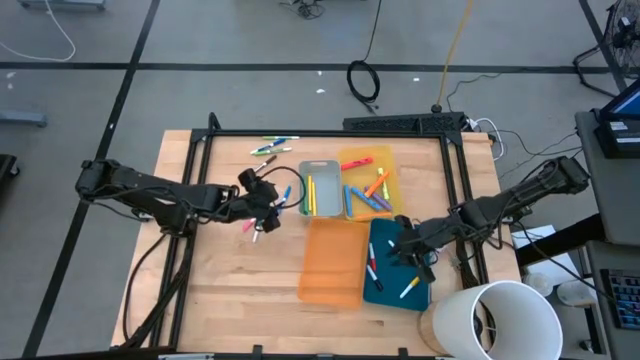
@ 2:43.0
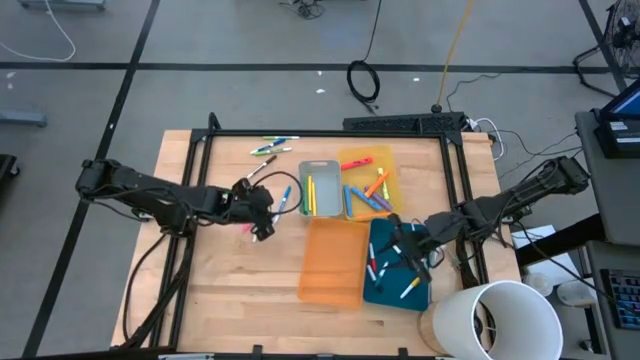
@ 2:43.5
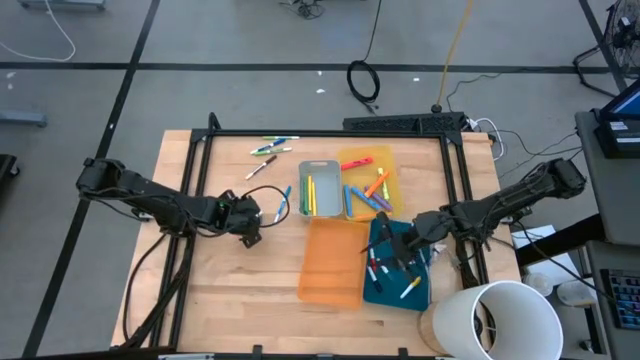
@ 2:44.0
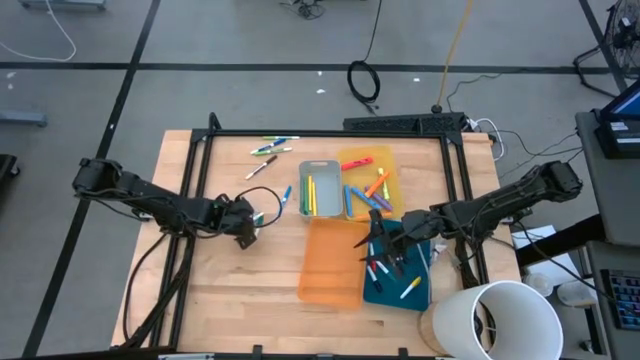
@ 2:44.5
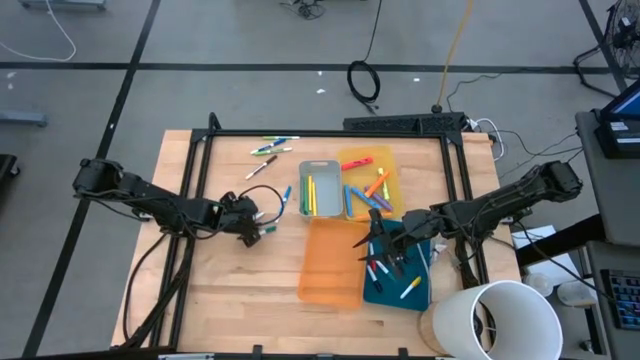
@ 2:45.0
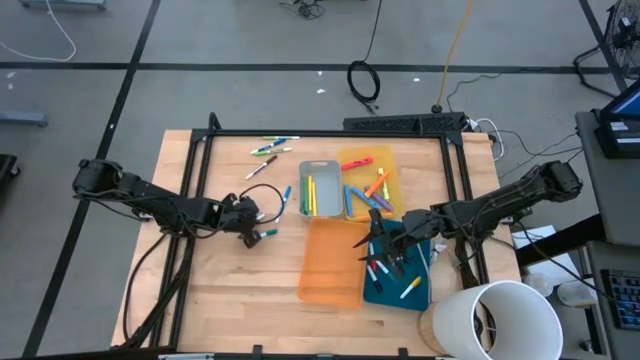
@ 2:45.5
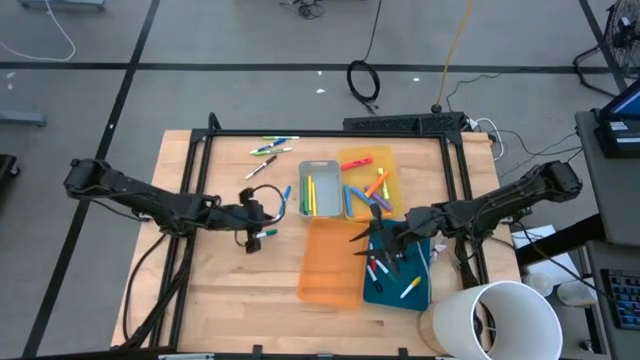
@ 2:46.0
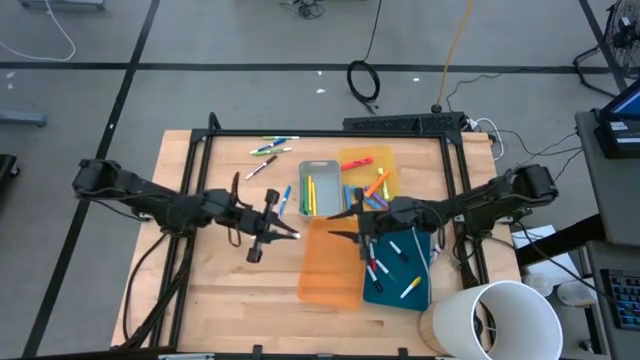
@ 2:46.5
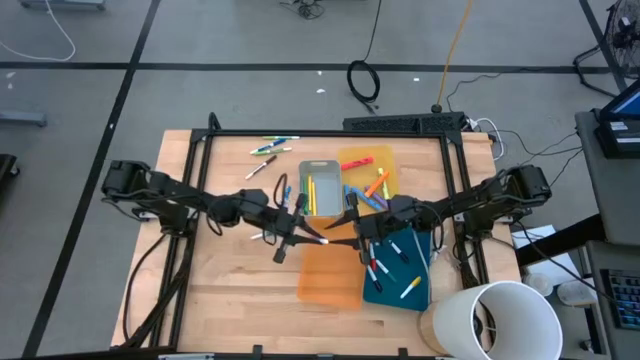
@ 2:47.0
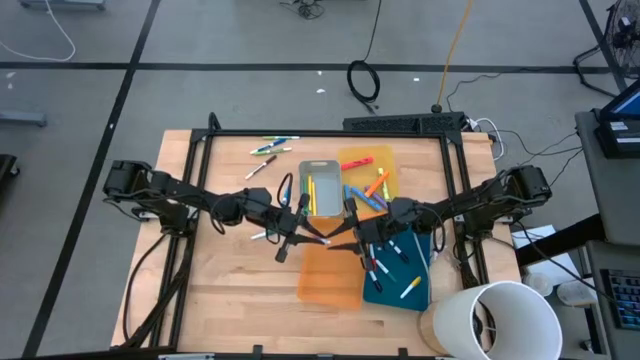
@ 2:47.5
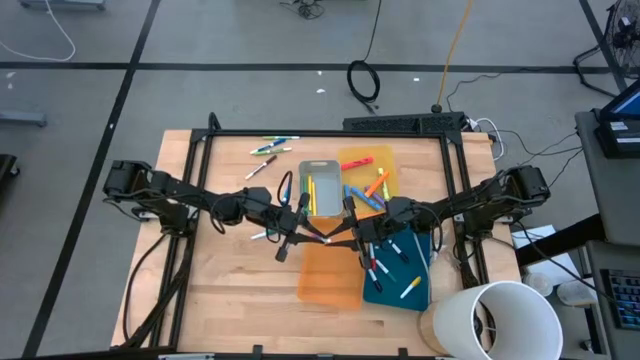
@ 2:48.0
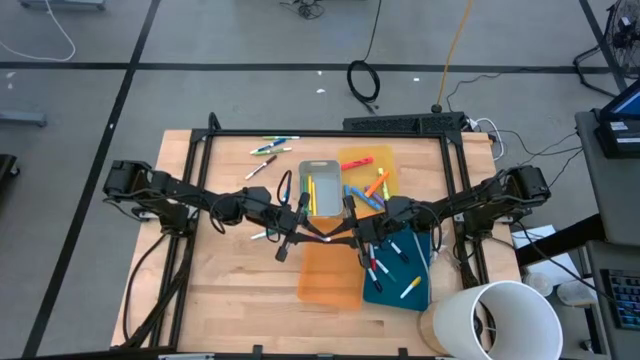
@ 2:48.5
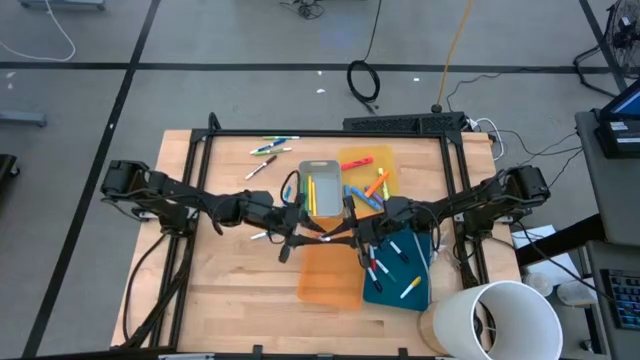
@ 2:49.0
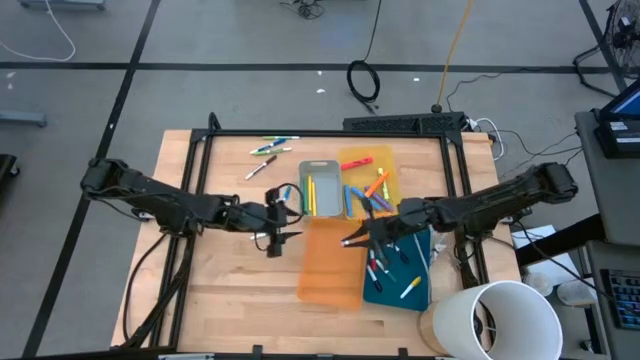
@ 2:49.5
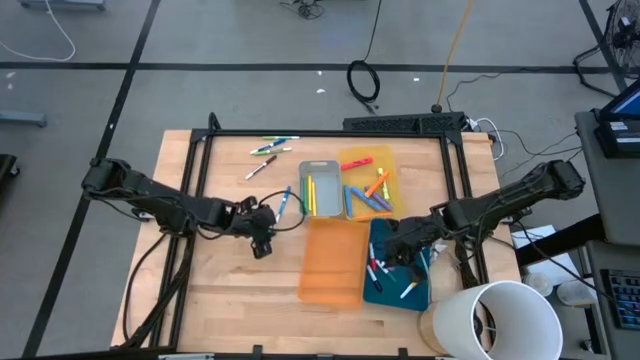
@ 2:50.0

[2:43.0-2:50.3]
Task: Pick & Place Markers
Put the white and pink highlighter pen into the blue bin

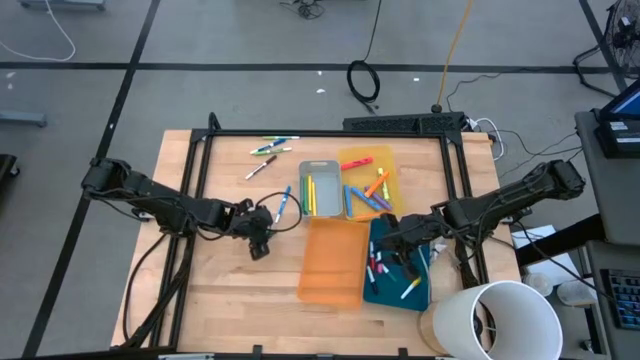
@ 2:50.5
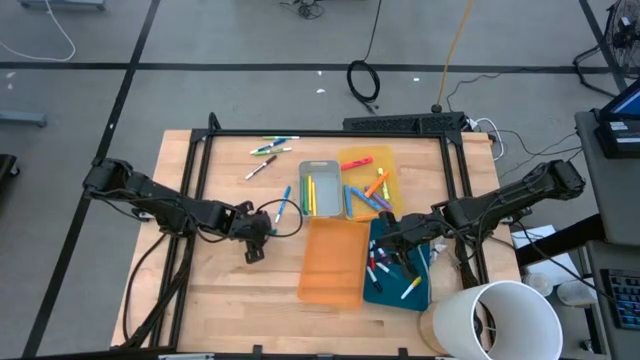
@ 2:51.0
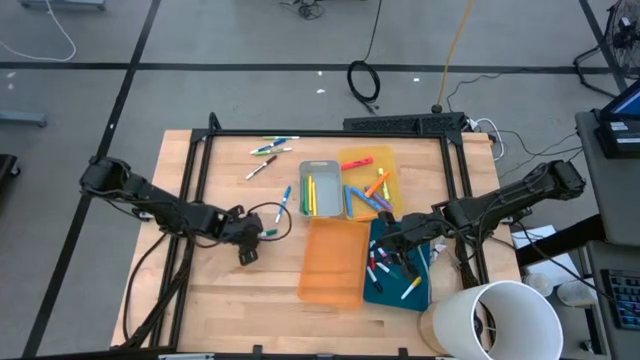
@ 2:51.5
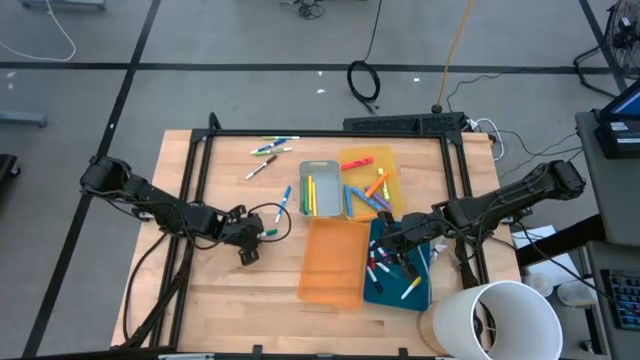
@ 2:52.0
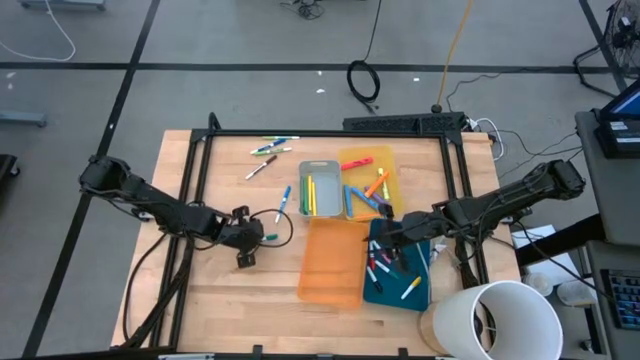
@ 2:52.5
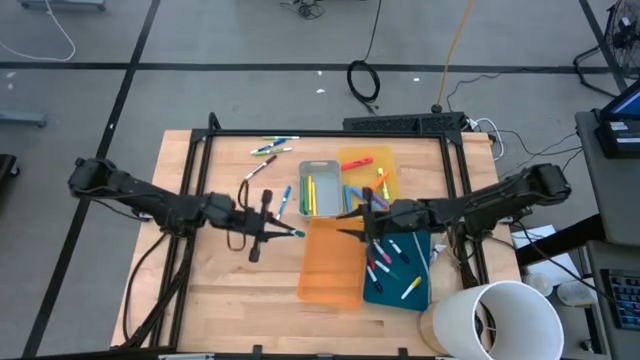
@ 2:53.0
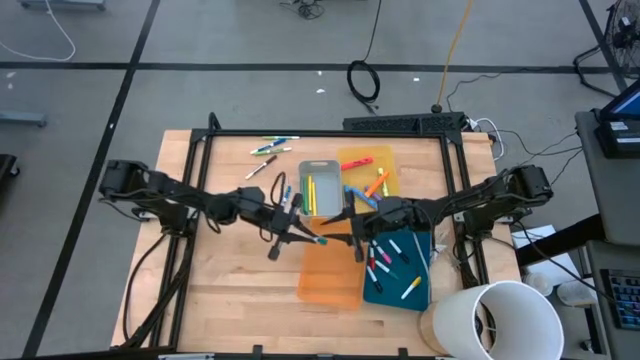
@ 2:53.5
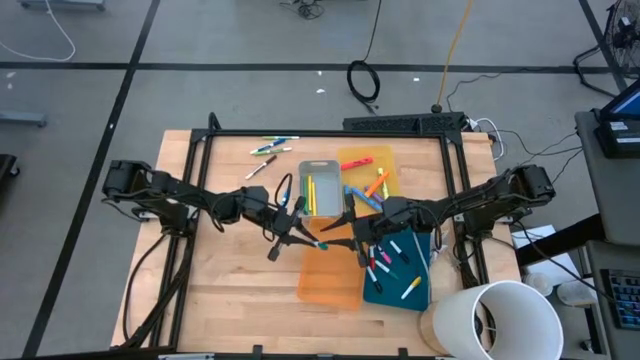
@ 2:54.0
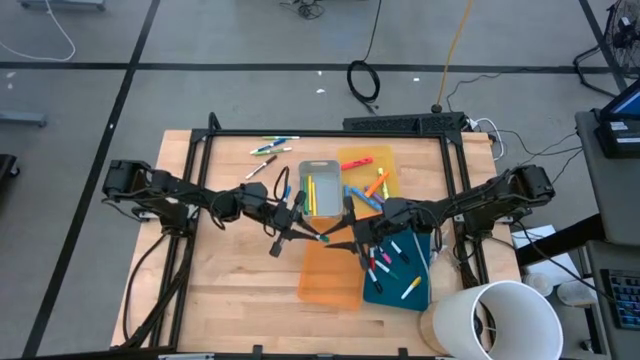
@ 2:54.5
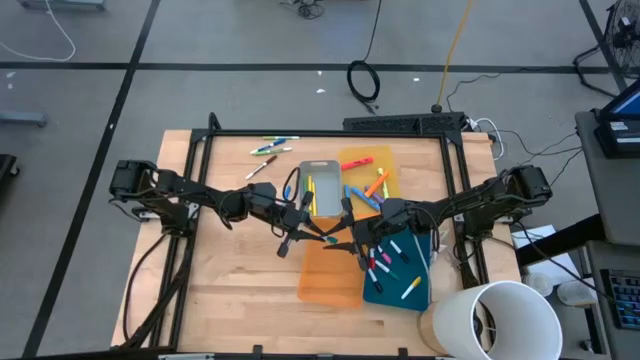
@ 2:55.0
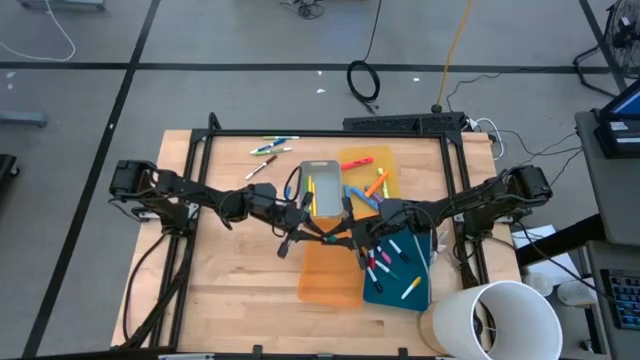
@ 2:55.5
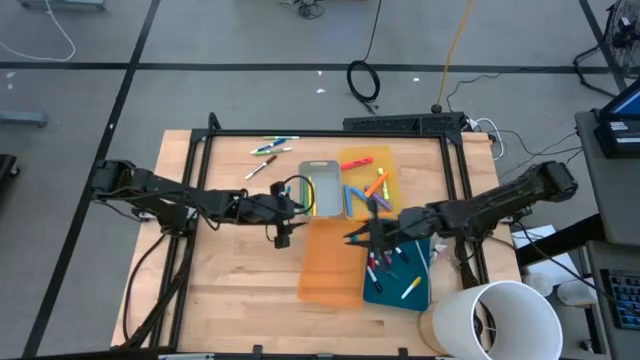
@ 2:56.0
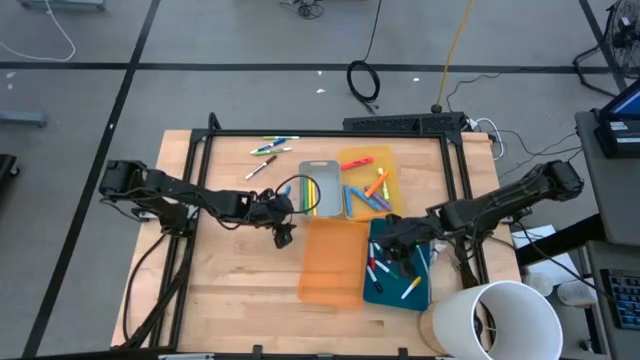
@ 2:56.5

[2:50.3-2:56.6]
Put the white and green highlighter pen into the blue bin

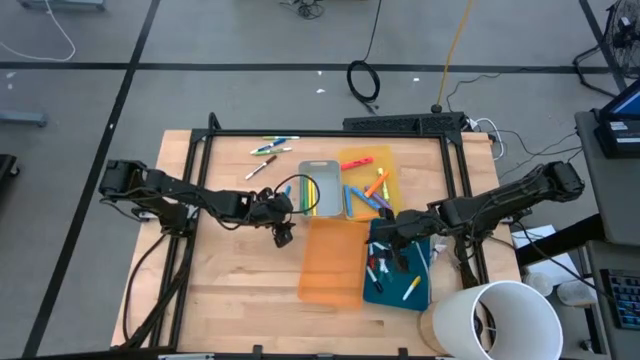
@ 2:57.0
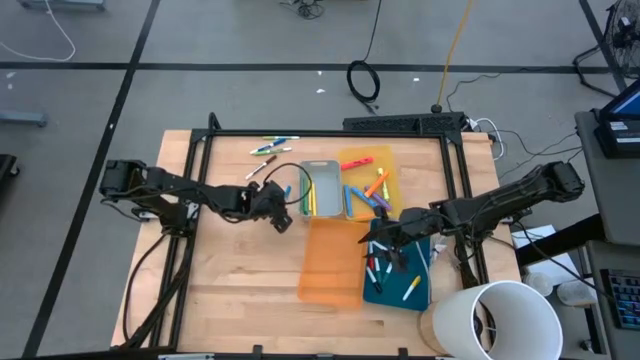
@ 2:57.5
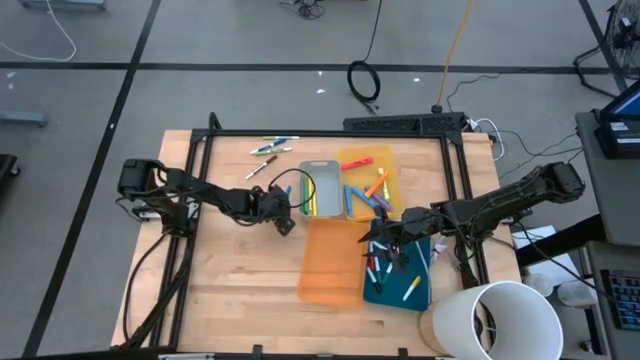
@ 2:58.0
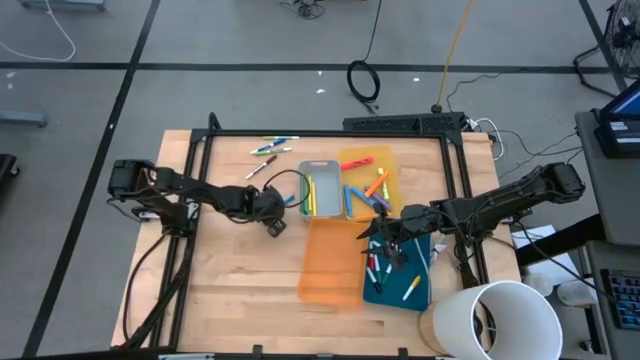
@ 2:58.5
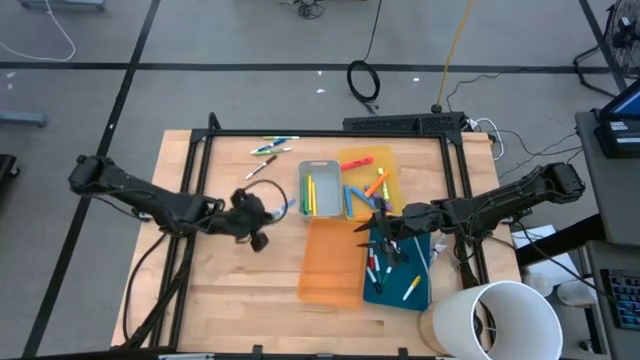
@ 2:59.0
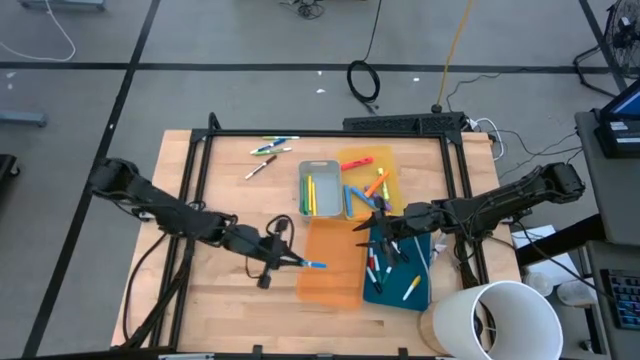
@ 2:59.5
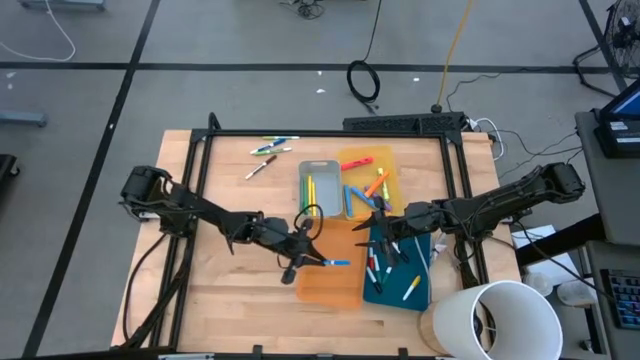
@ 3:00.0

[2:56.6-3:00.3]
Put the light blue marker pen into the orange bin

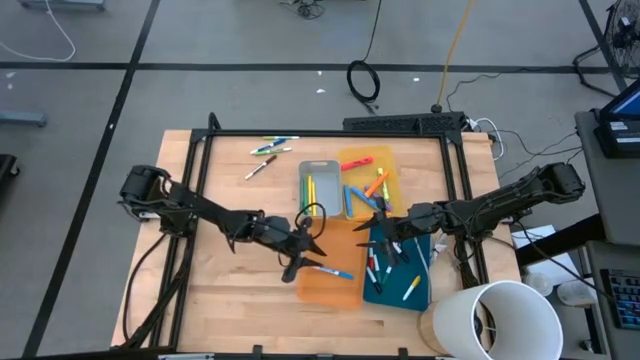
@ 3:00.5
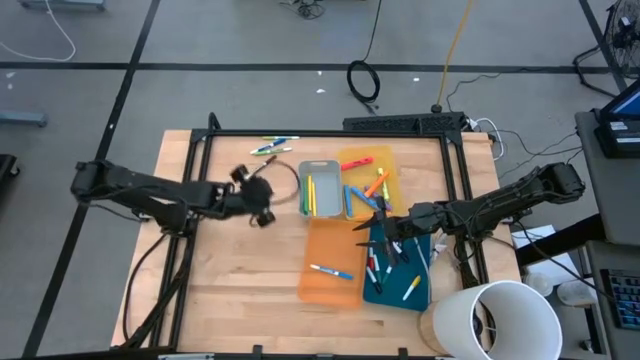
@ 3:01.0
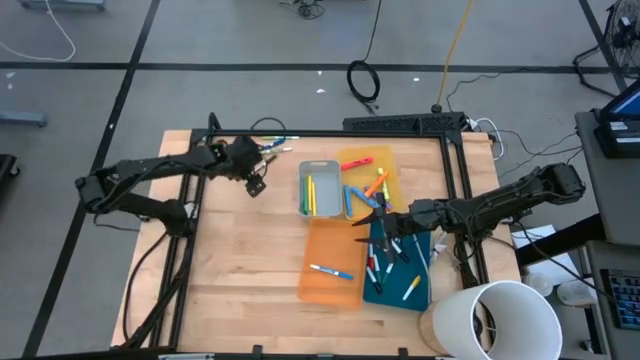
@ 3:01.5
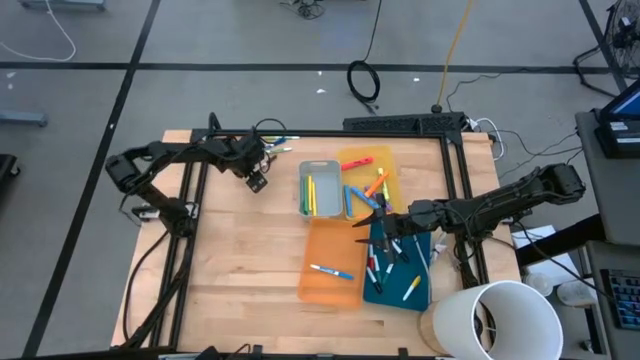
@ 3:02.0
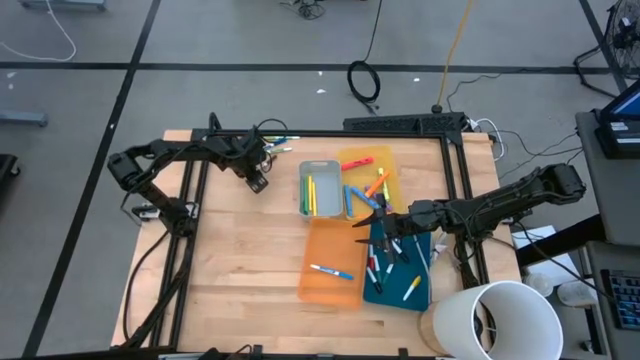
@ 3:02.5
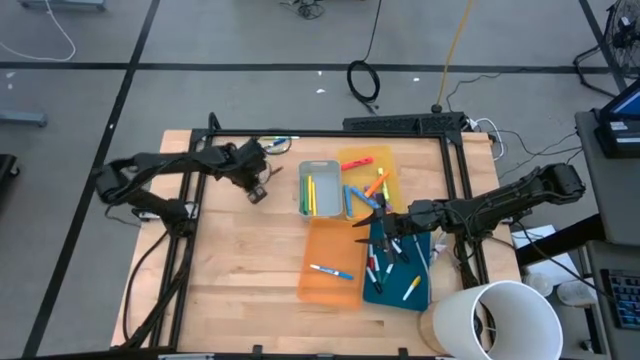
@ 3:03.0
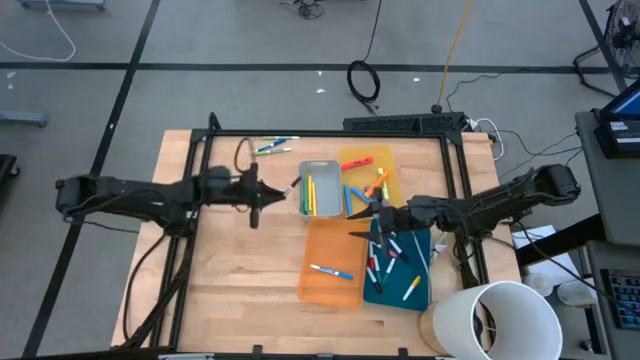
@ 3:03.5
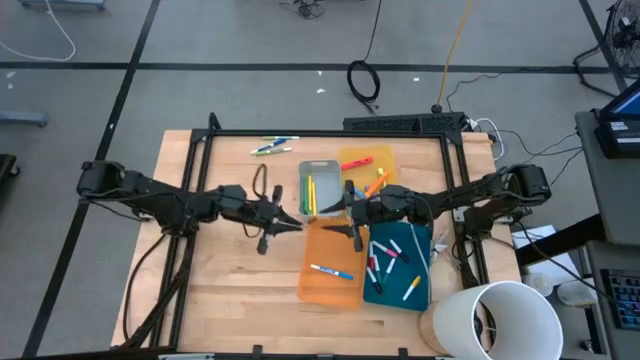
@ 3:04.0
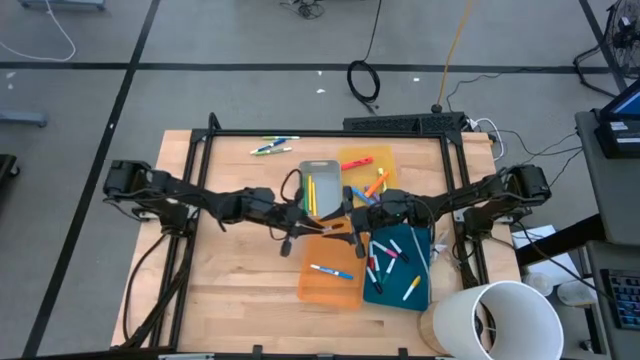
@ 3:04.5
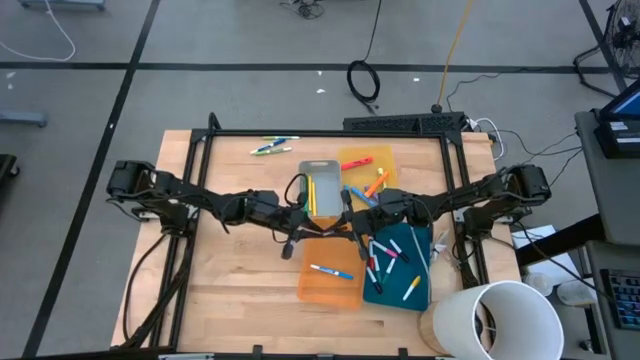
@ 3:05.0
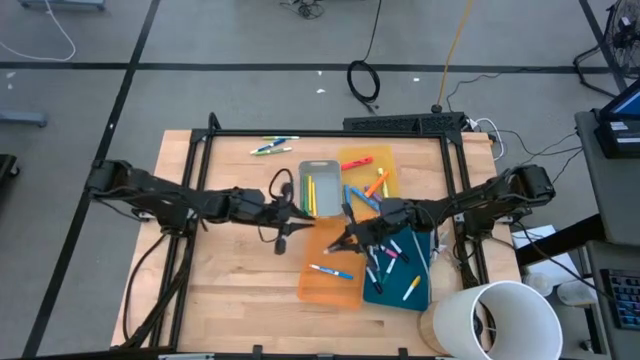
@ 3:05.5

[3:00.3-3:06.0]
Put the brown marker pen into the orange bin
